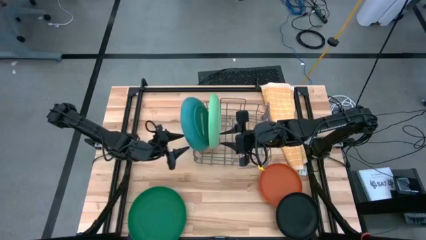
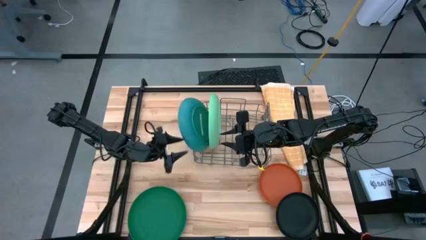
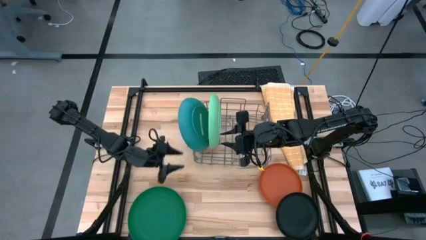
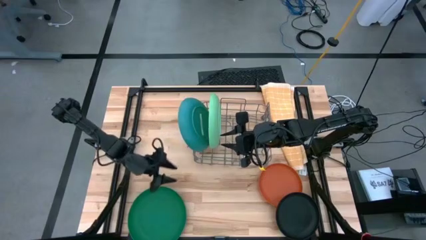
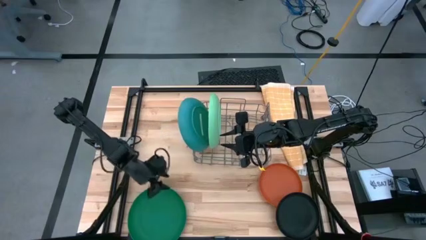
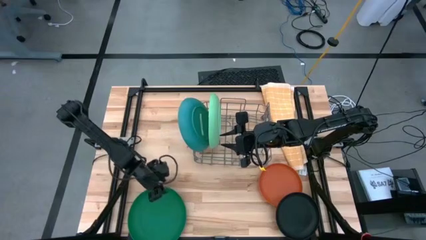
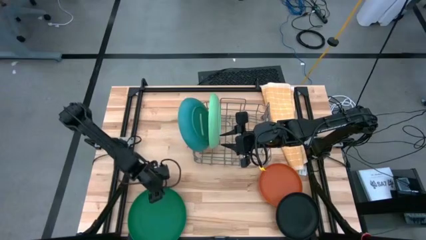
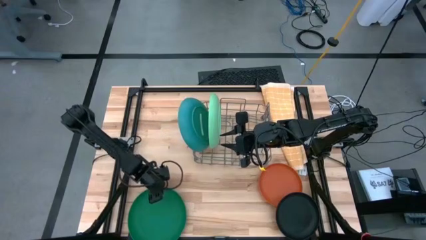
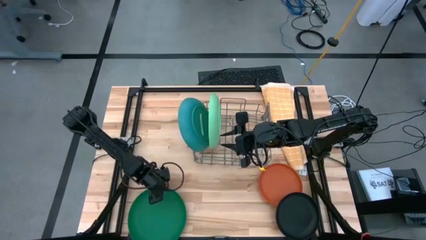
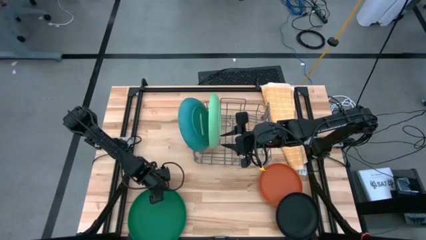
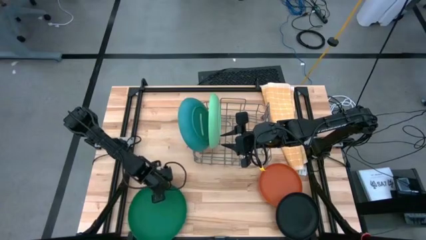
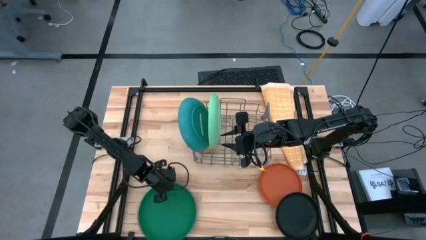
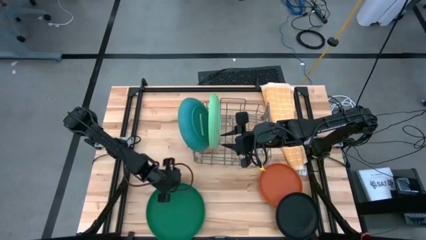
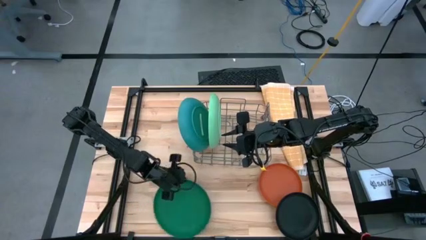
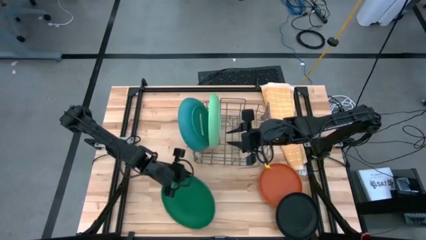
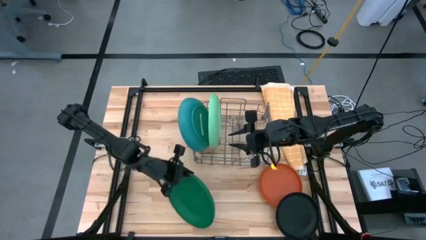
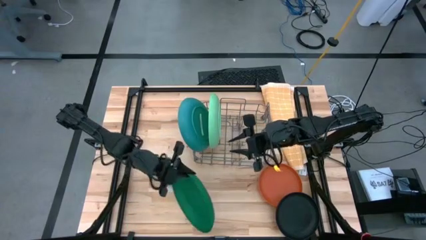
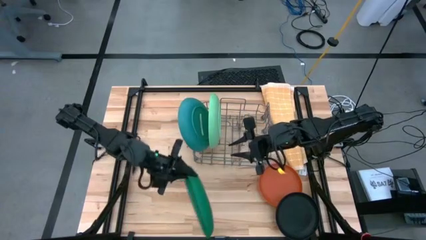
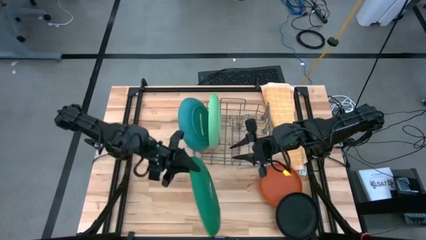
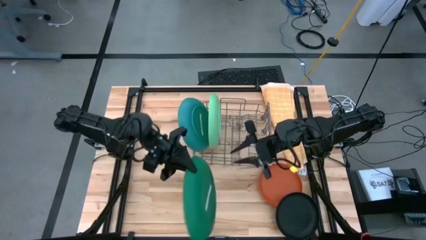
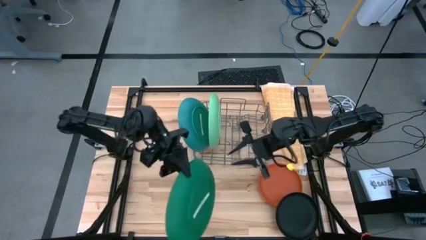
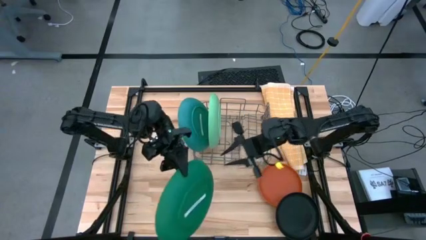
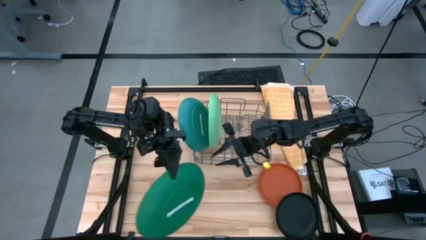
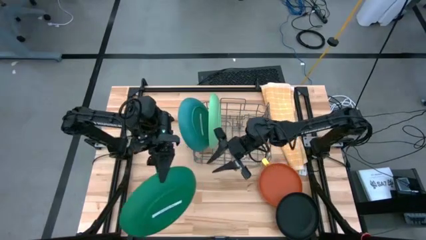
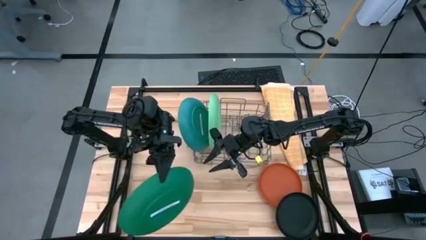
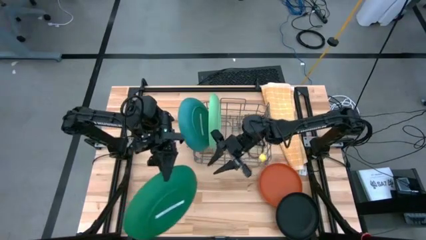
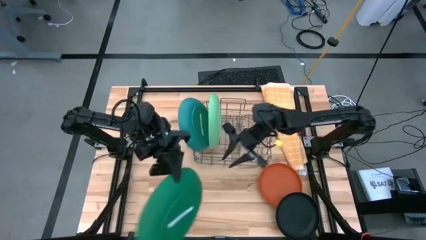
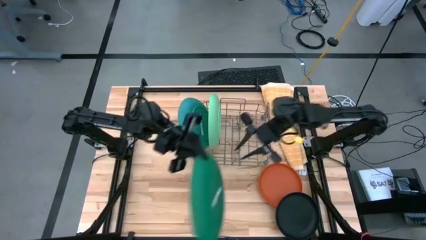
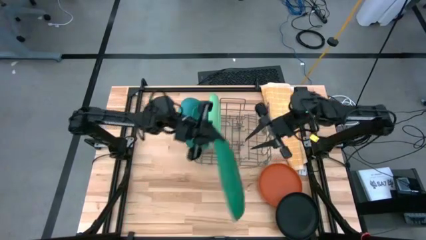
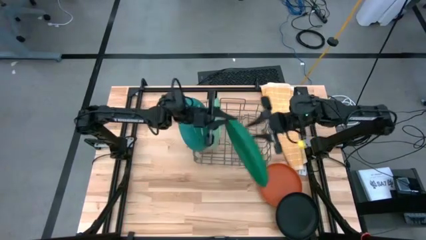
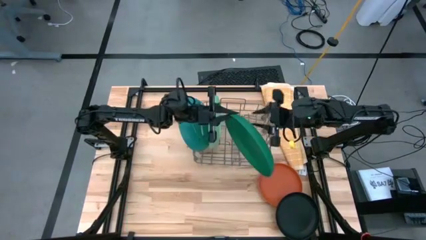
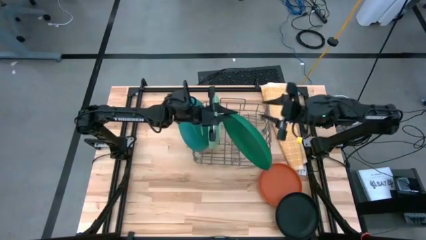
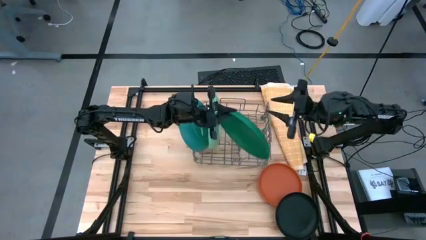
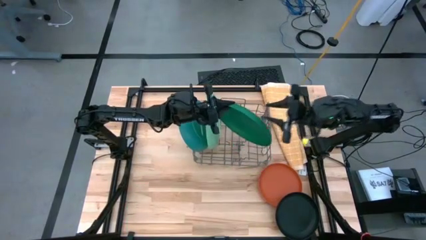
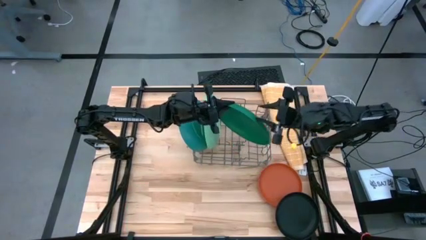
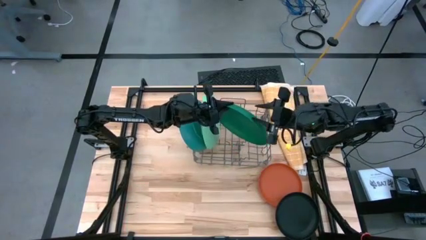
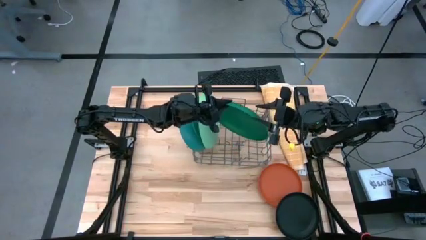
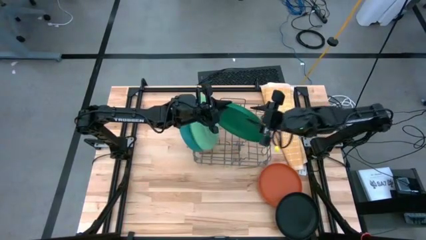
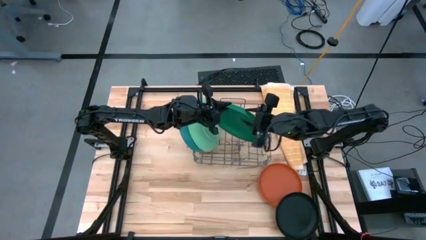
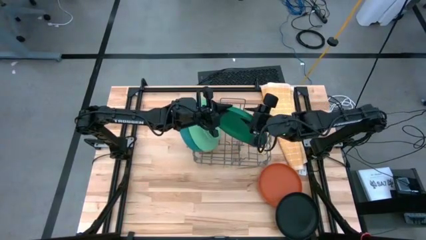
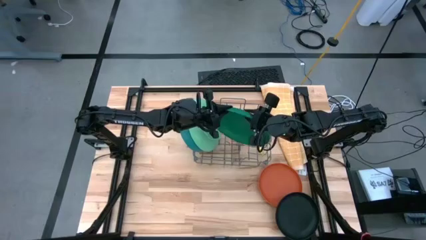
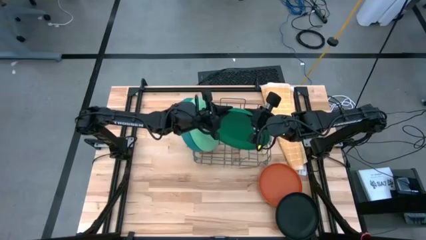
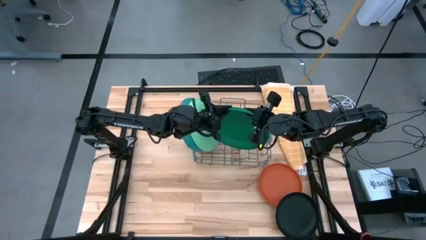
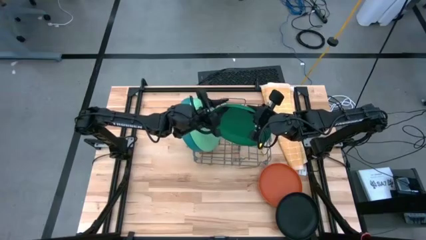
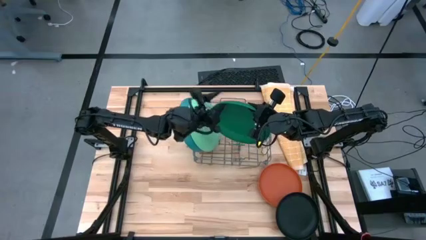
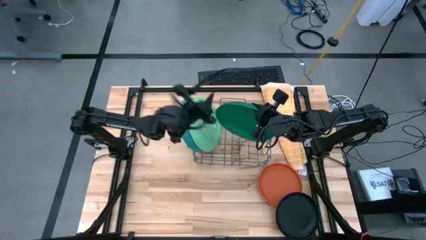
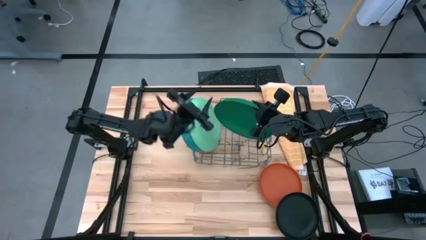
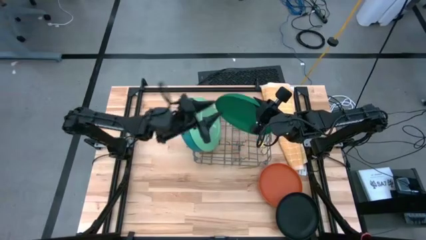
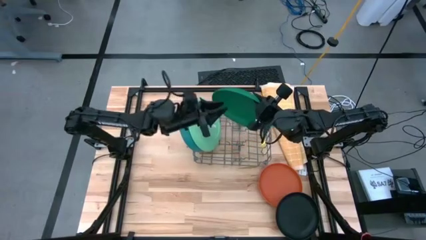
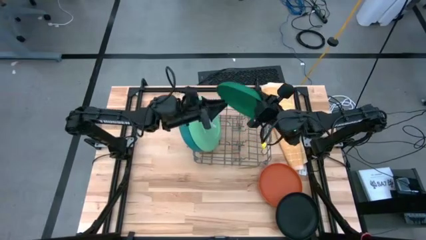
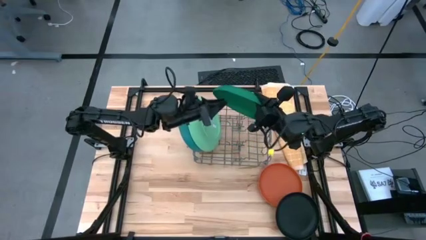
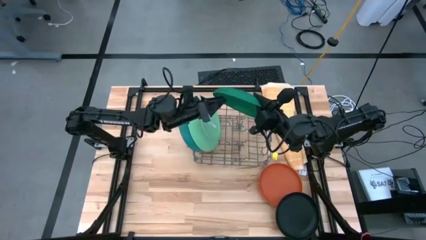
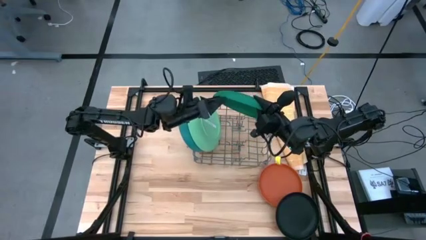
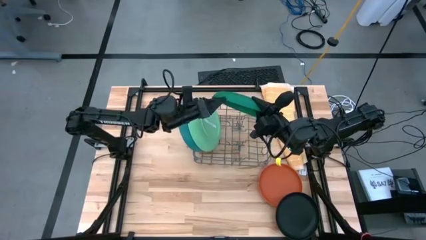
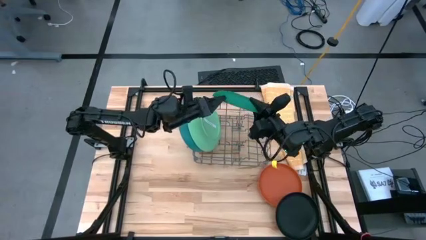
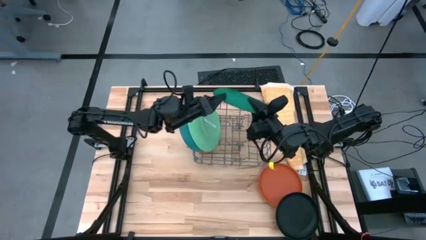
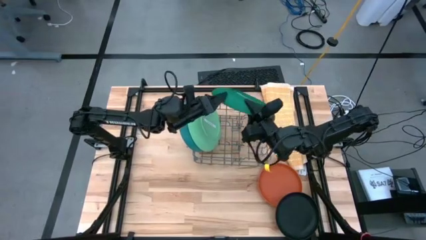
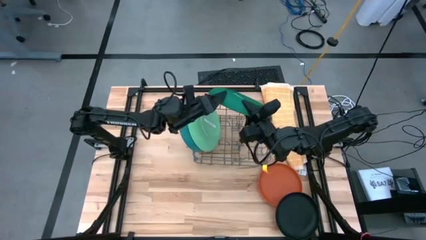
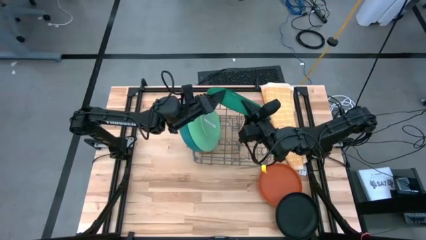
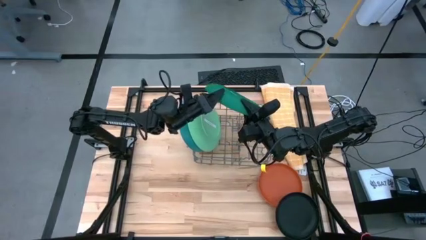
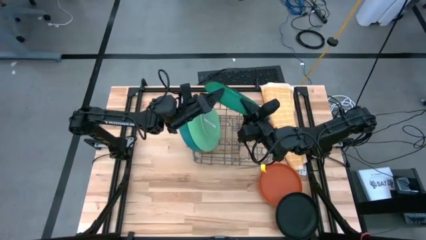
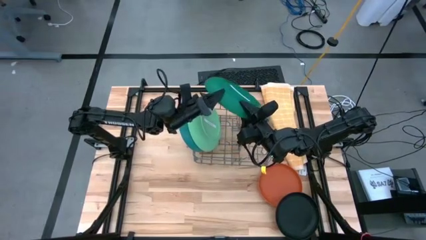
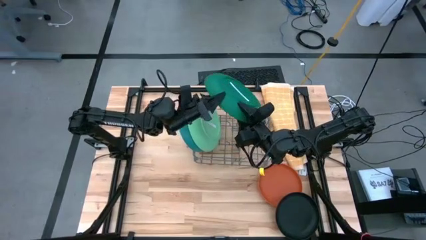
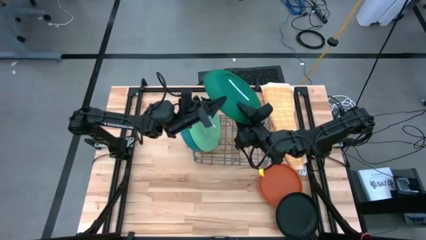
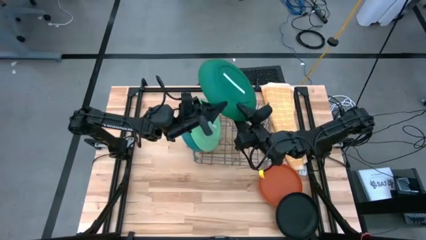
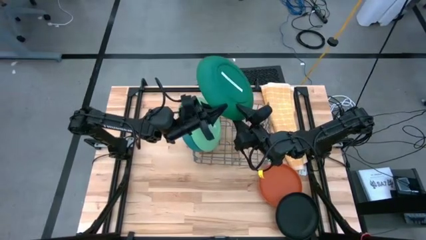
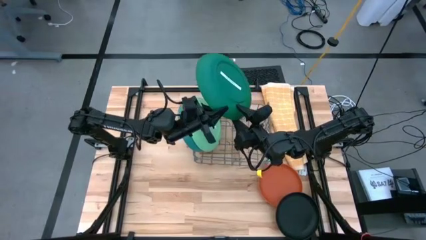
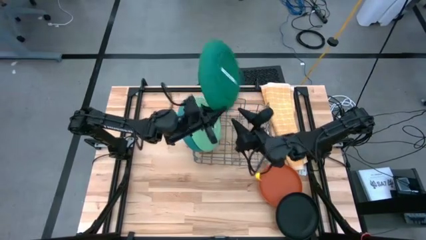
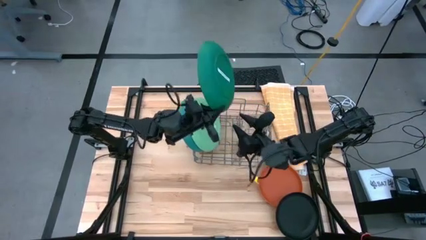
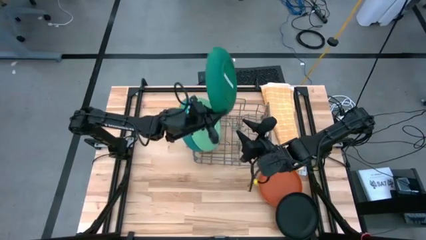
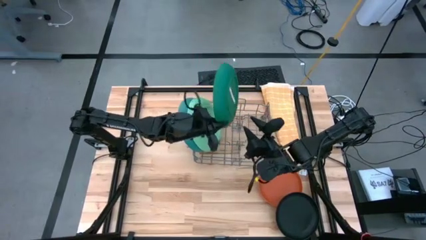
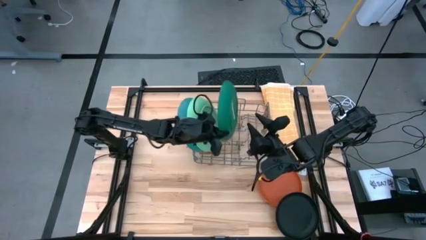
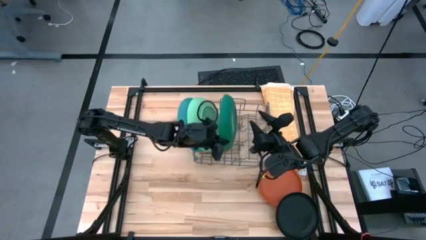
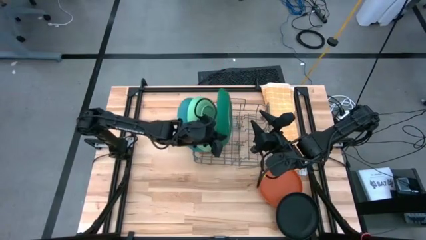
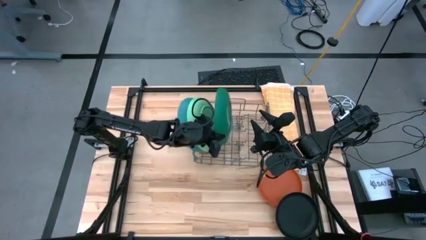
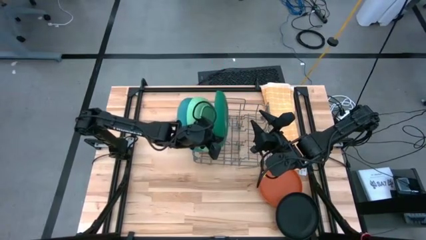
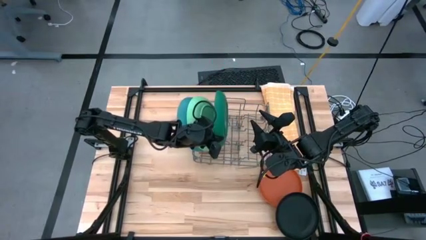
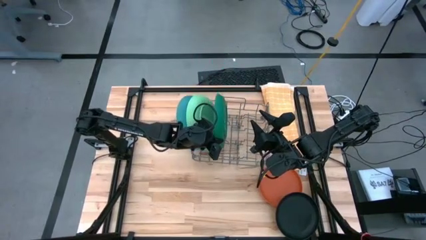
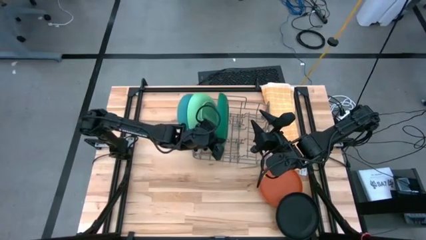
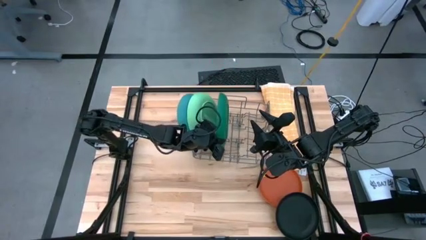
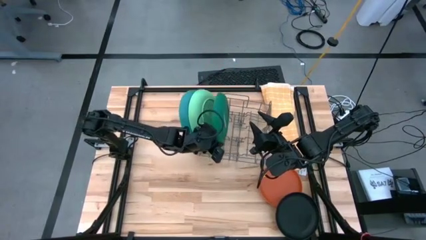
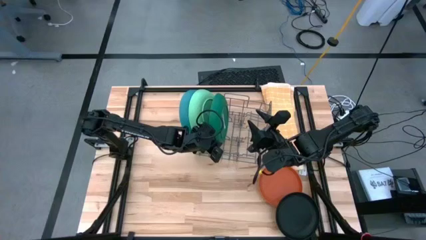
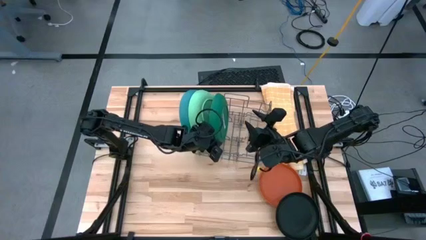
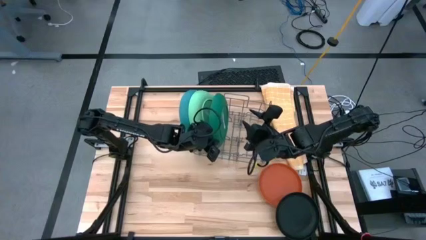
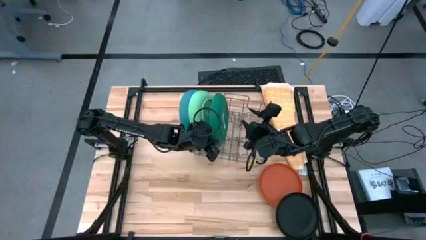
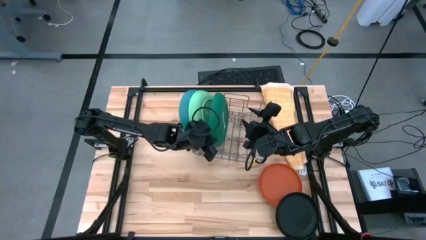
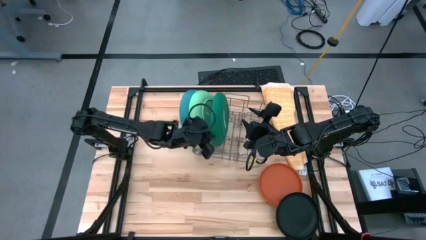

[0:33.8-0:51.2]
Task: Sort dishes
Put the dark green plate in the dishwasher rack
